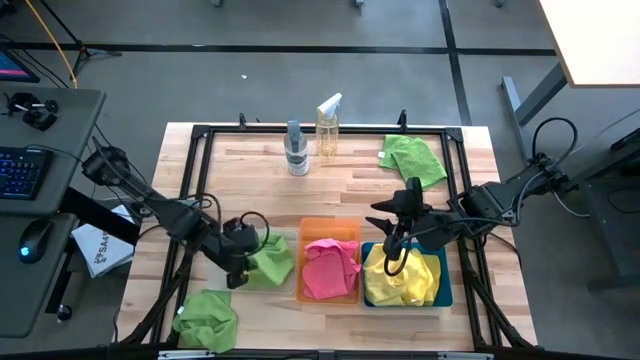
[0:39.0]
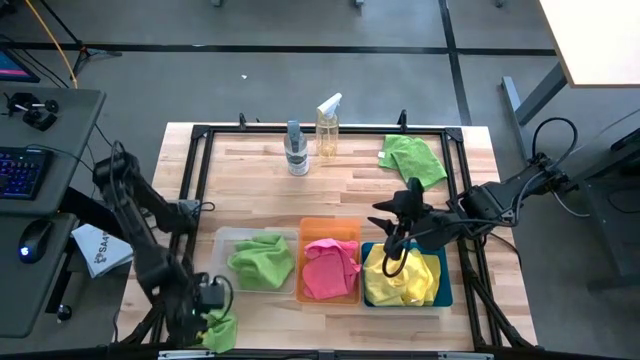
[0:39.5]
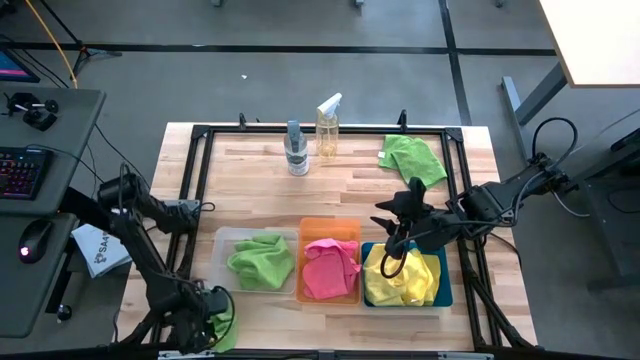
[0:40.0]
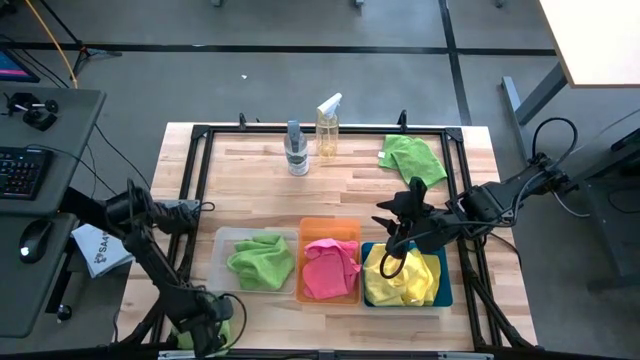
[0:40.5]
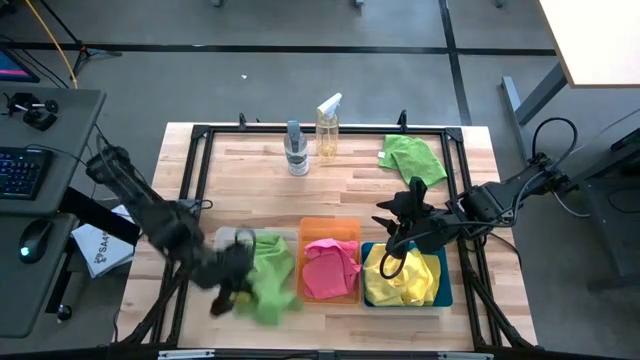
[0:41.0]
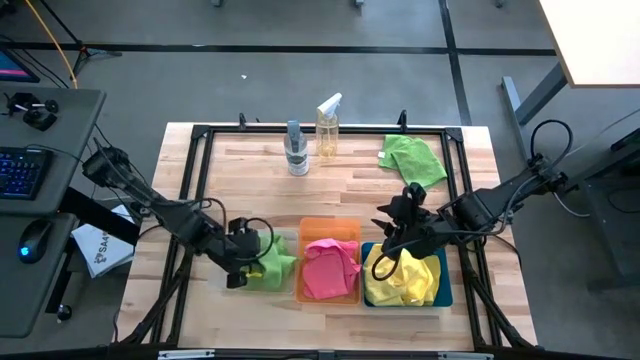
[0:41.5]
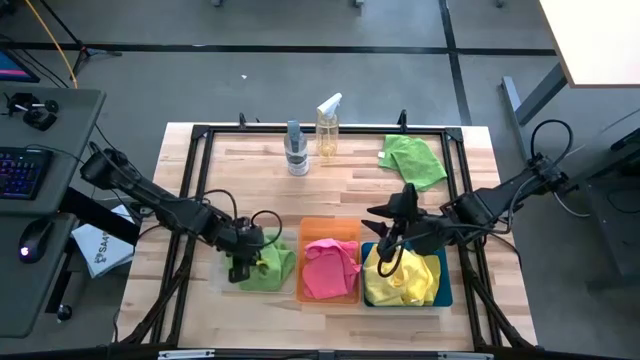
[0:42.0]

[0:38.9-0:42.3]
Task: Sort microfiber towel by color & place in baskets
Put the bottom green towel into the transparent bin

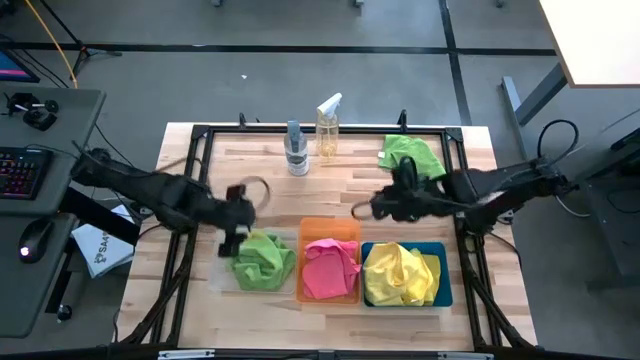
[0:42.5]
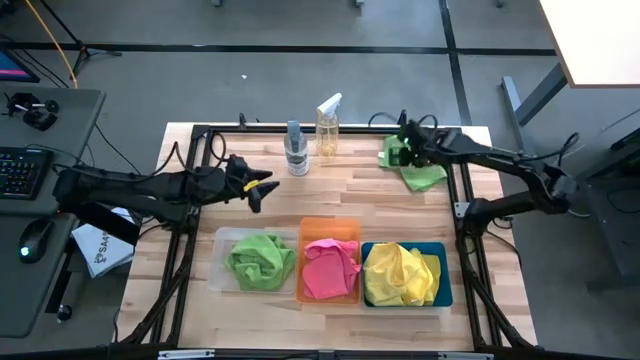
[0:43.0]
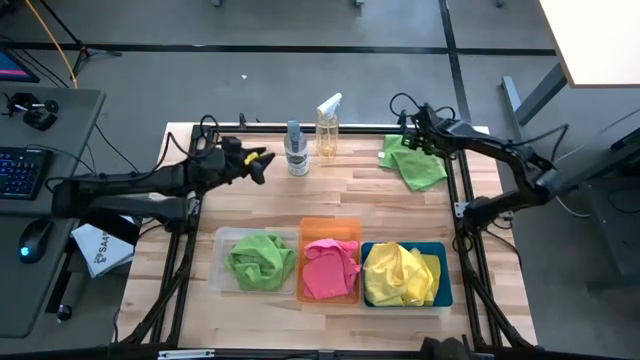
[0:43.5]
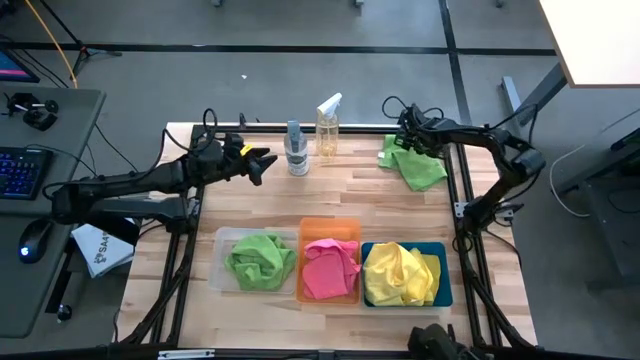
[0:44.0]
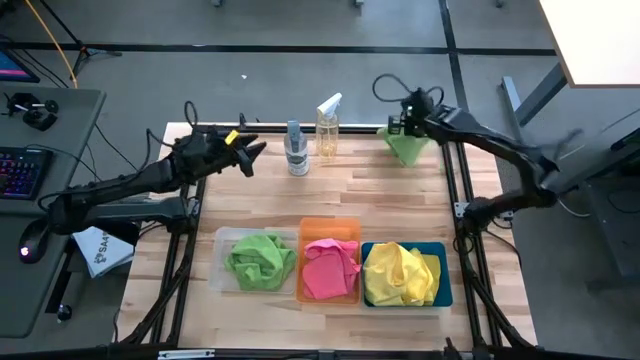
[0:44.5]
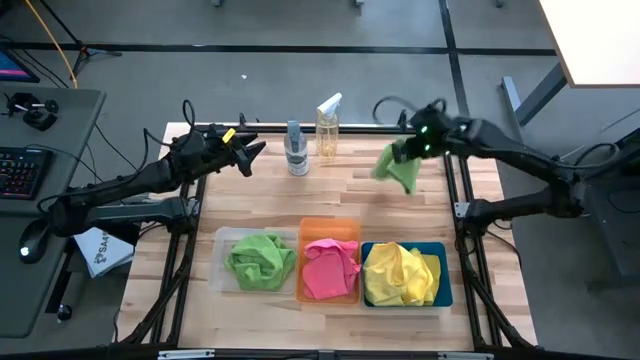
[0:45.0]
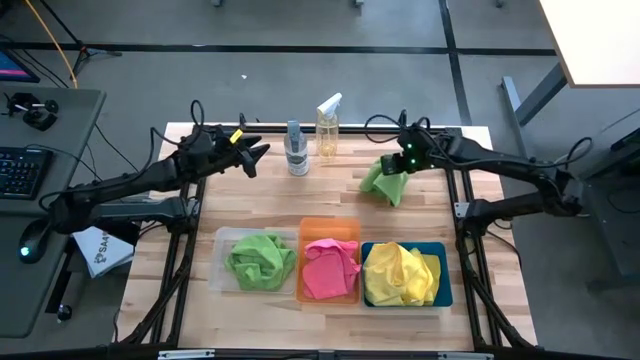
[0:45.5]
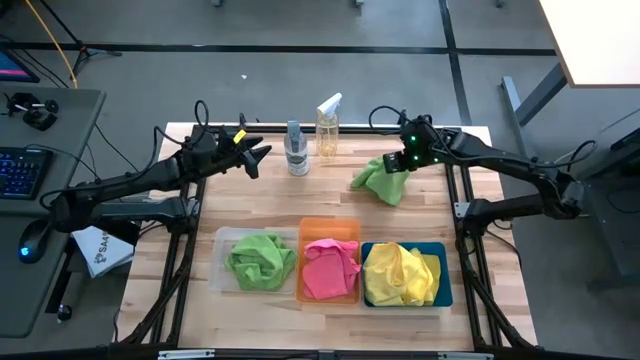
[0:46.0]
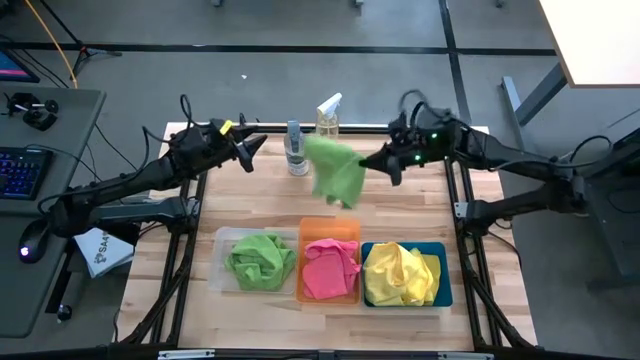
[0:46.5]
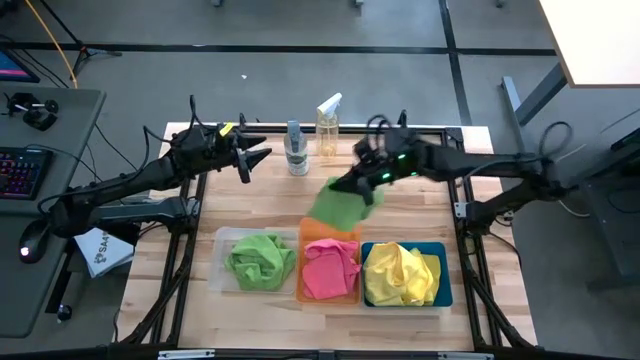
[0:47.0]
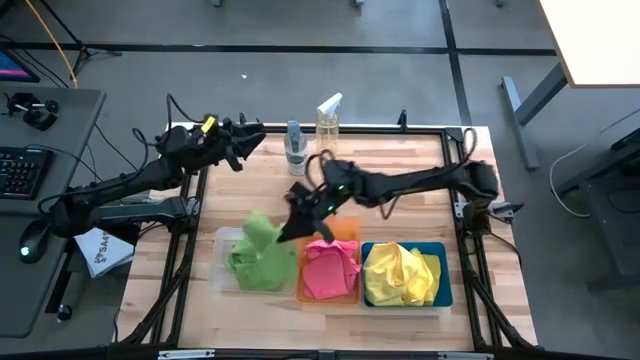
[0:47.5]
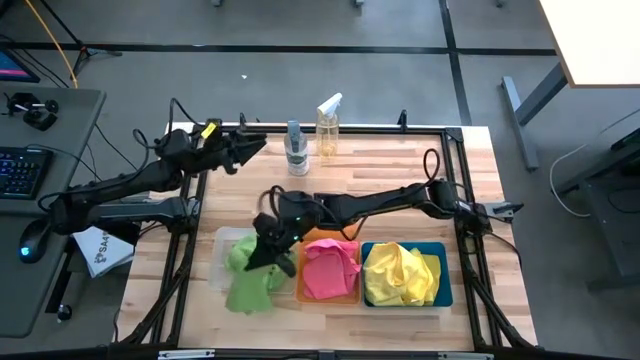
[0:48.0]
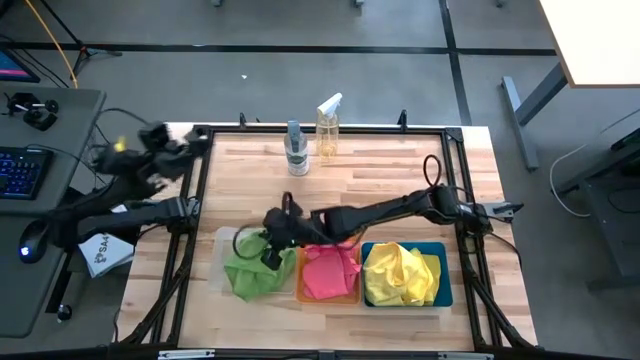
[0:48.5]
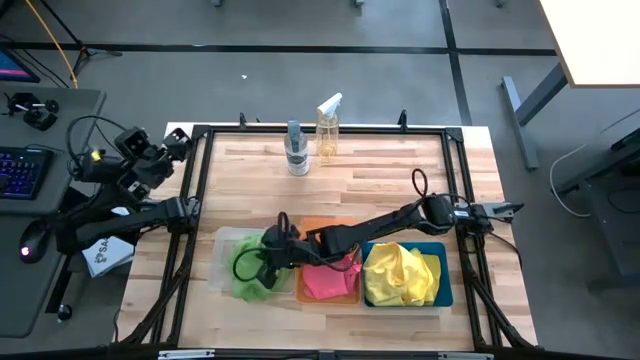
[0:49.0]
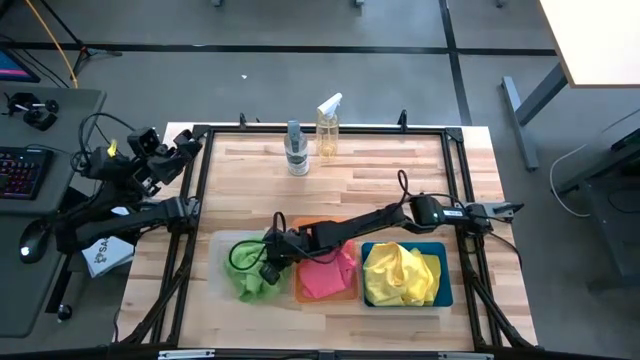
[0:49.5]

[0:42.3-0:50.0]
Put the green towel into the transparent bin

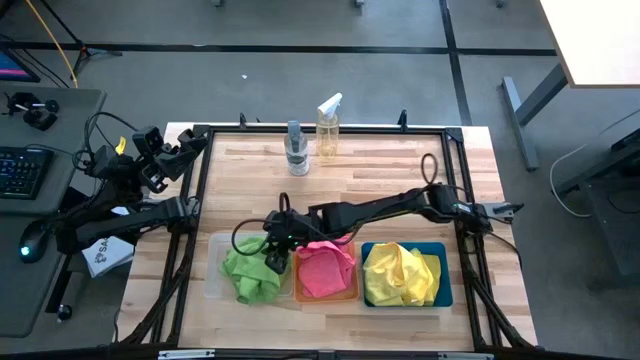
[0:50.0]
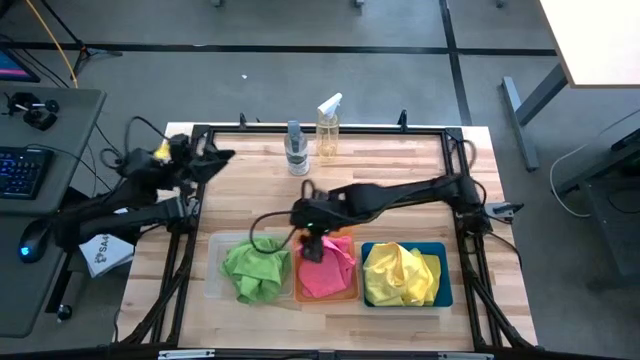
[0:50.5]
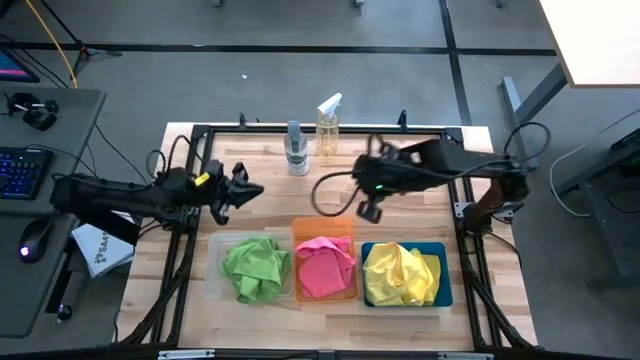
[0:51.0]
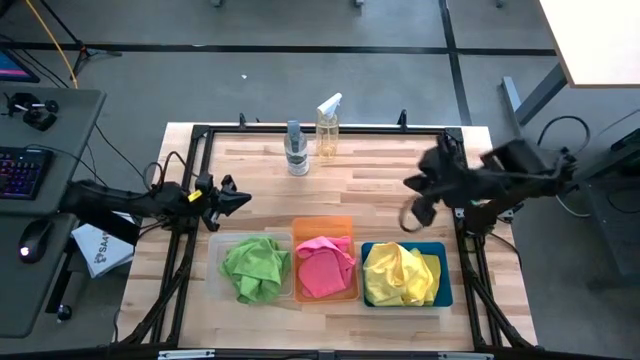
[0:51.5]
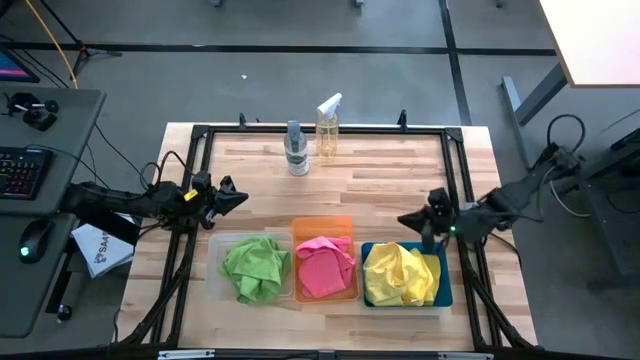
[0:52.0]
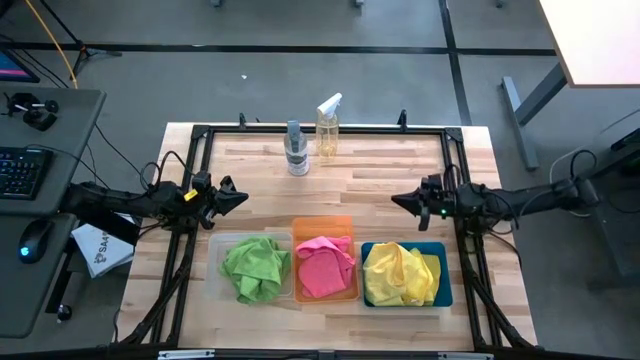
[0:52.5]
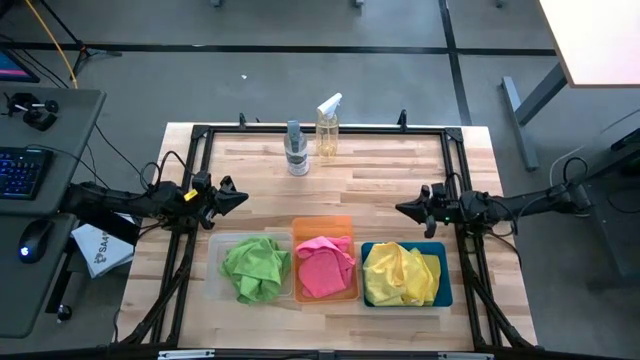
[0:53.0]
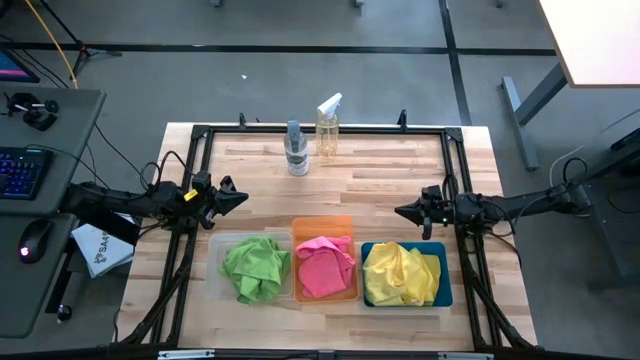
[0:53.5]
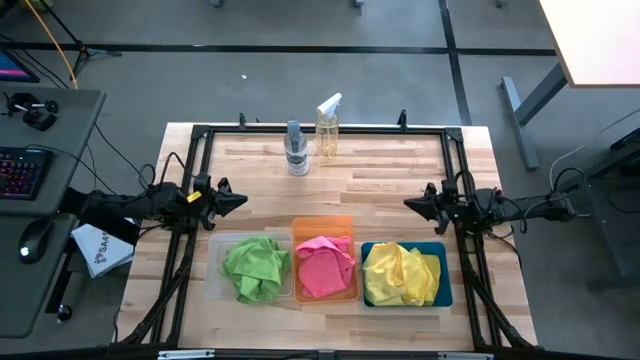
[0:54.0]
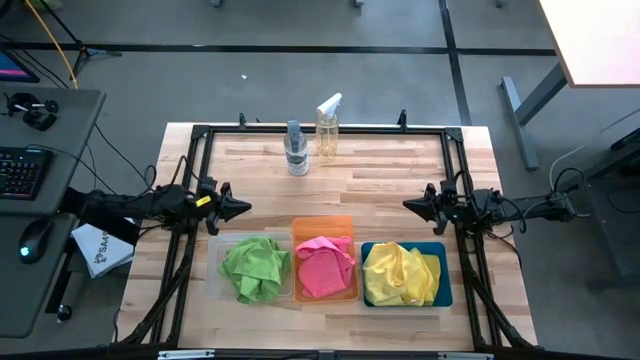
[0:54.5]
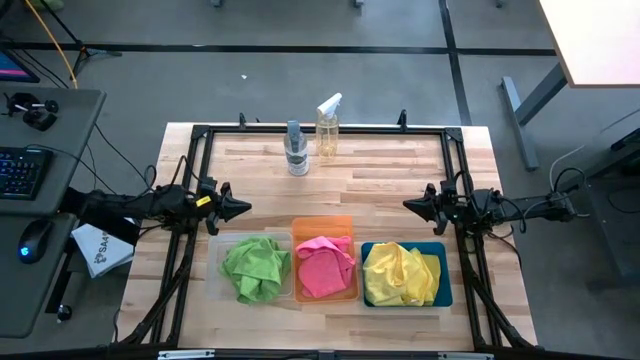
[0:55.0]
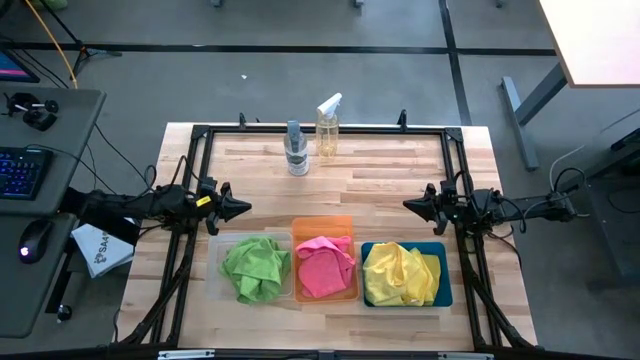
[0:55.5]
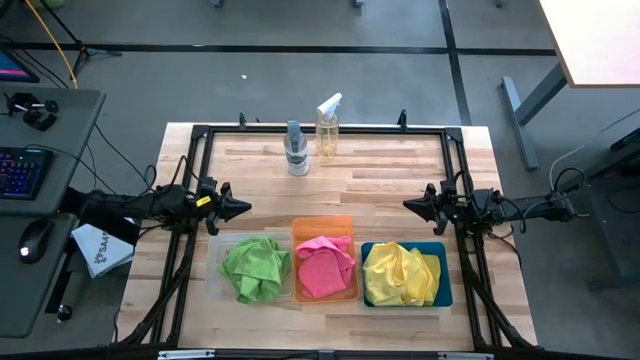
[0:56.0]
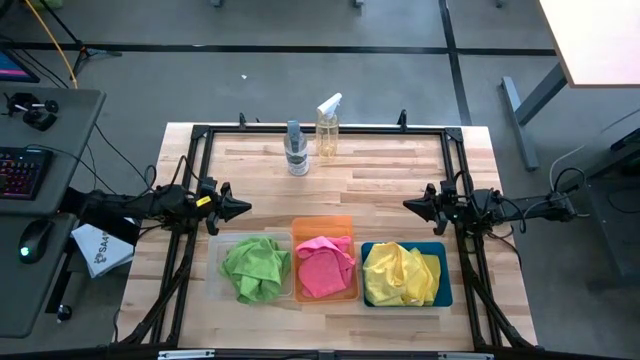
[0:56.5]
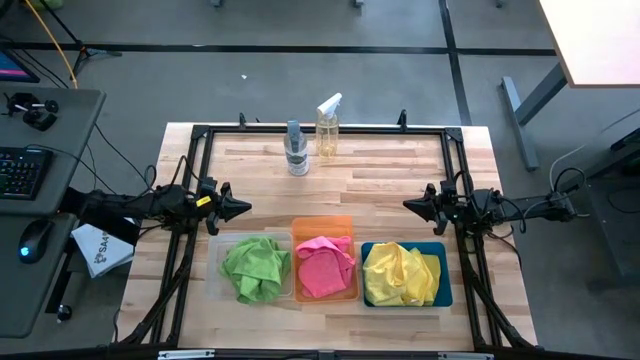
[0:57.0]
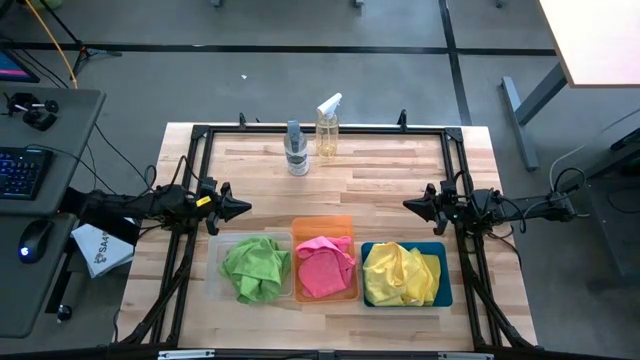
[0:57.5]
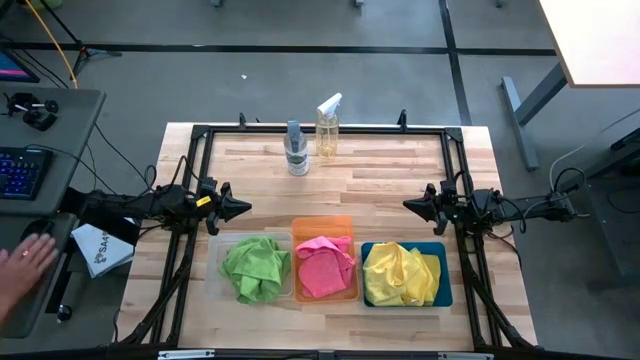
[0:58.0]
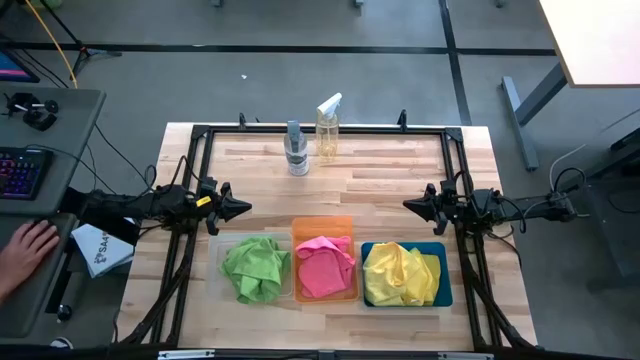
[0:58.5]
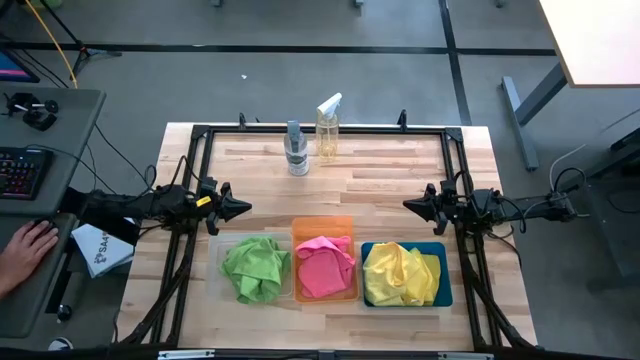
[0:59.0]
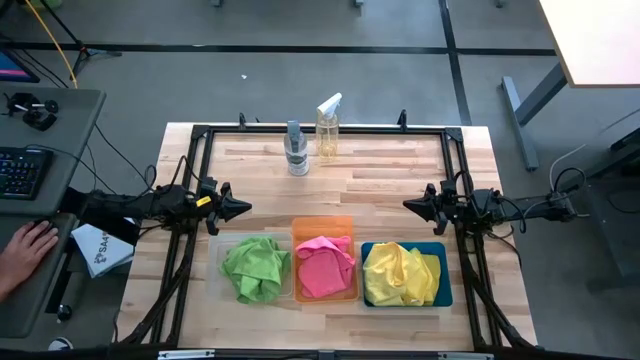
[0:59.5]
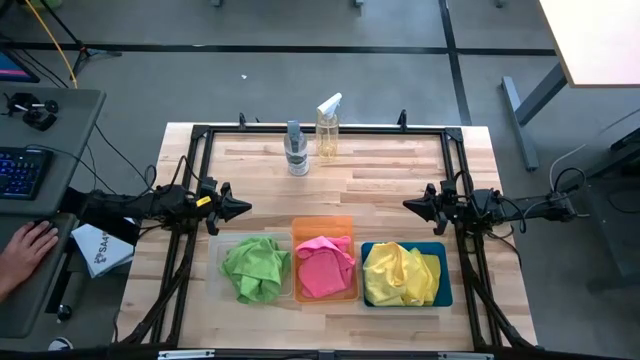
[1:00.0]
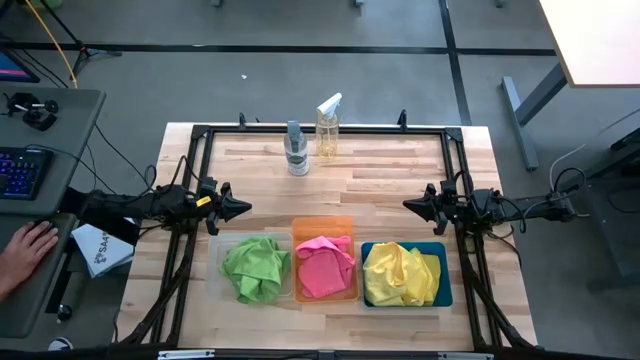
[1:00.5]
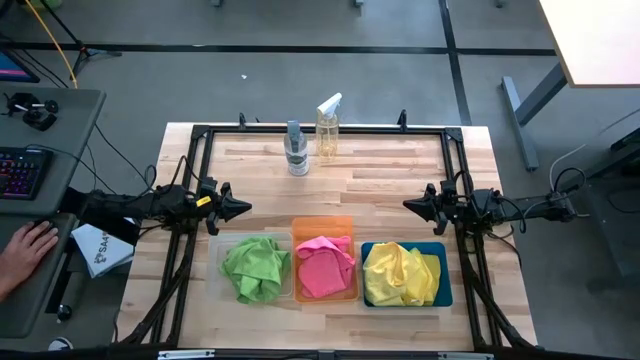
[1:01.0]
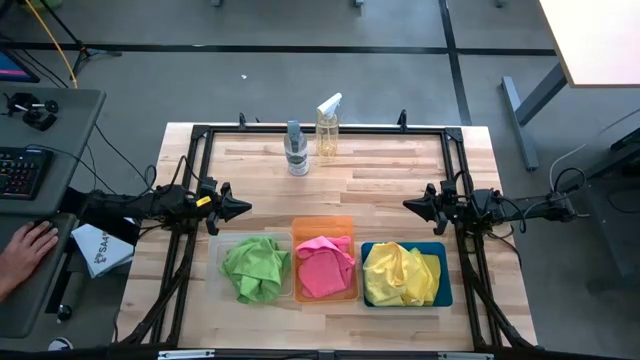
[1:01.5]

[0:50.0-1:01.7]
Return to Home Position
